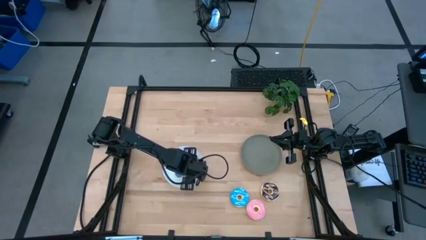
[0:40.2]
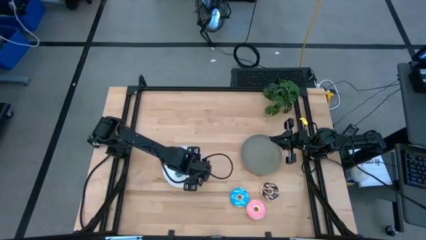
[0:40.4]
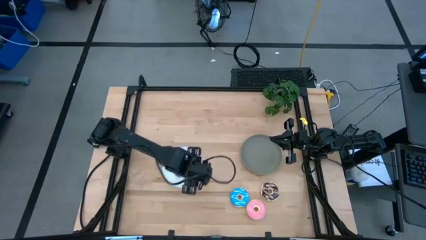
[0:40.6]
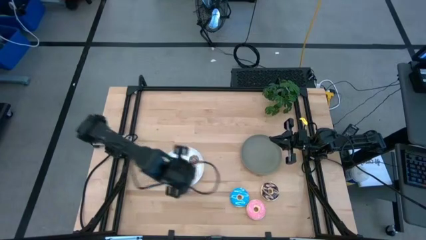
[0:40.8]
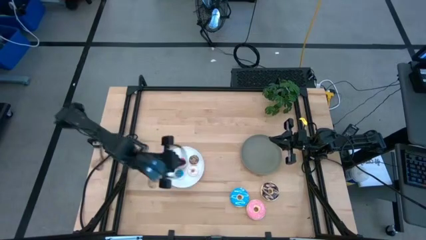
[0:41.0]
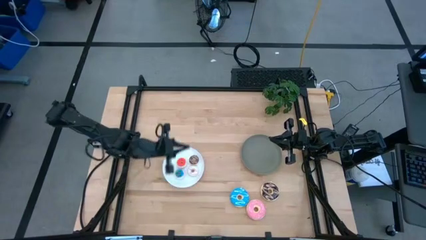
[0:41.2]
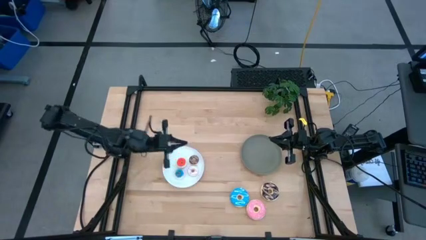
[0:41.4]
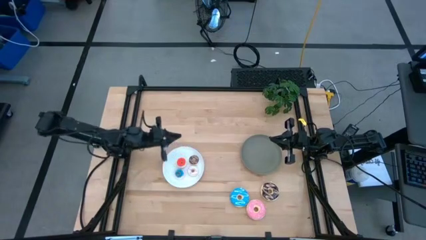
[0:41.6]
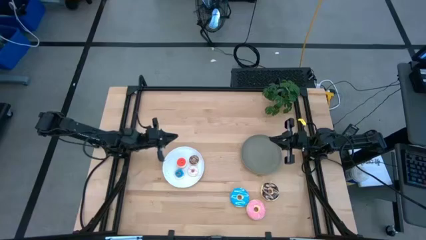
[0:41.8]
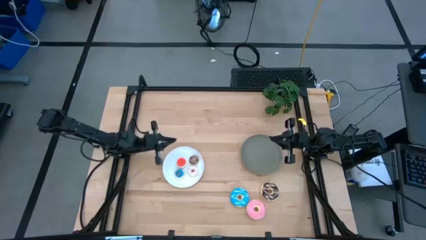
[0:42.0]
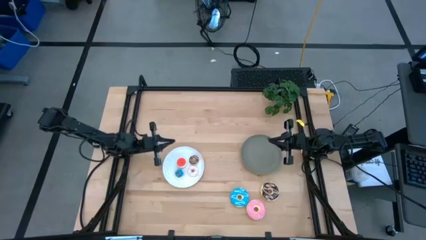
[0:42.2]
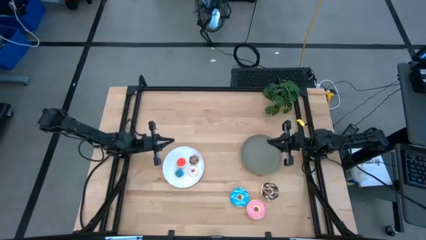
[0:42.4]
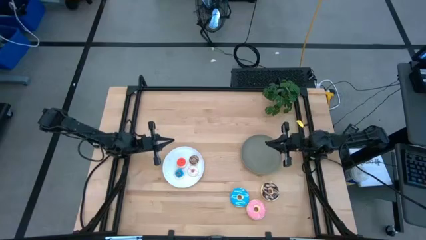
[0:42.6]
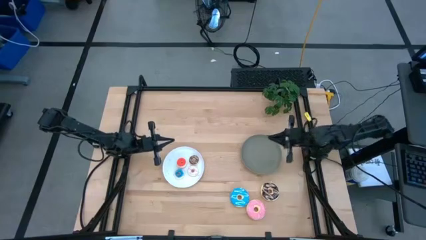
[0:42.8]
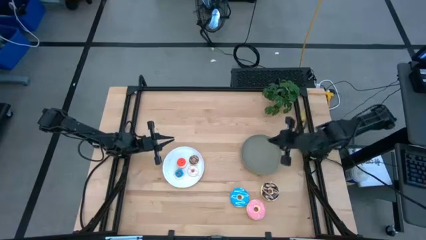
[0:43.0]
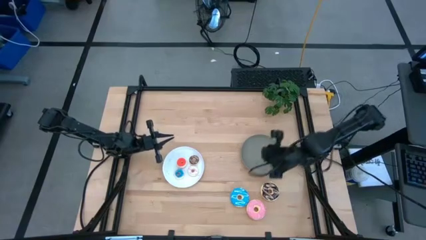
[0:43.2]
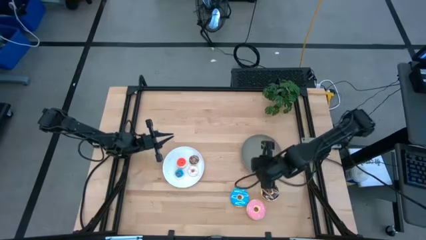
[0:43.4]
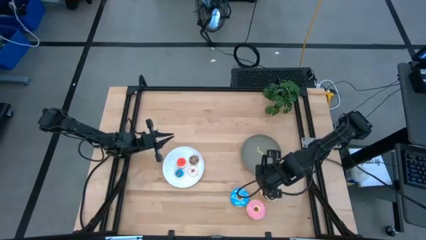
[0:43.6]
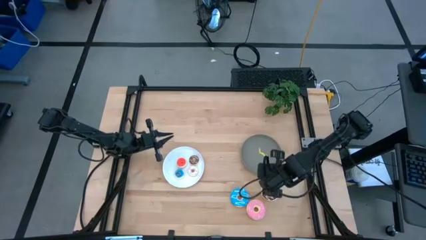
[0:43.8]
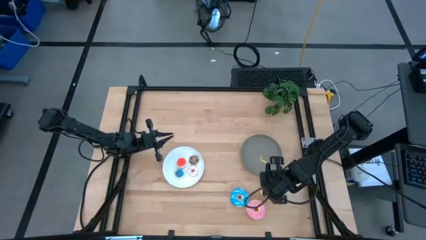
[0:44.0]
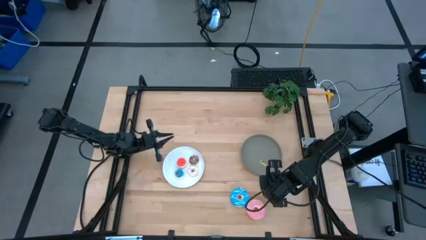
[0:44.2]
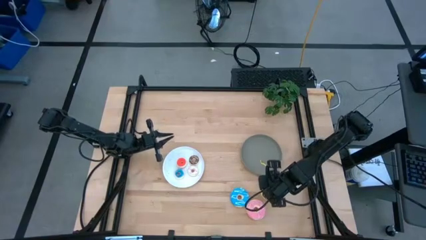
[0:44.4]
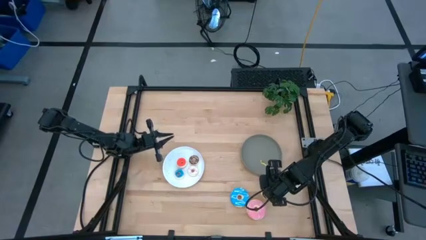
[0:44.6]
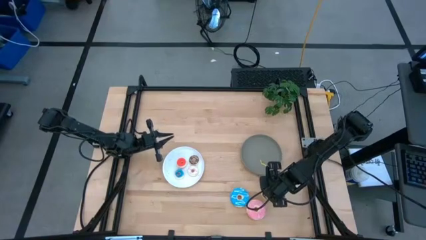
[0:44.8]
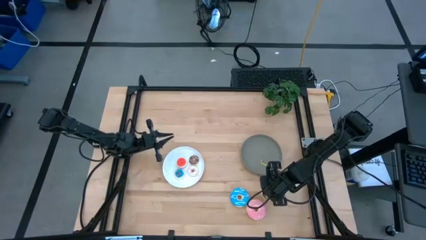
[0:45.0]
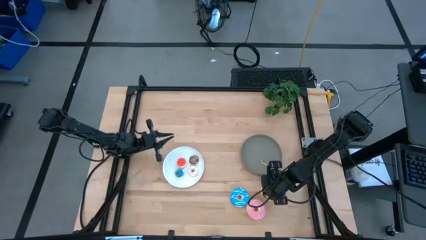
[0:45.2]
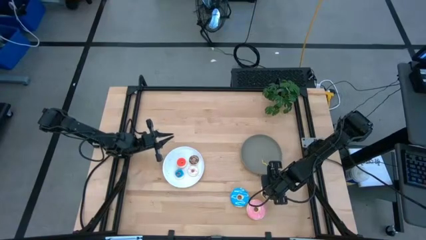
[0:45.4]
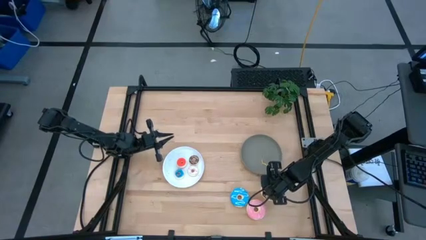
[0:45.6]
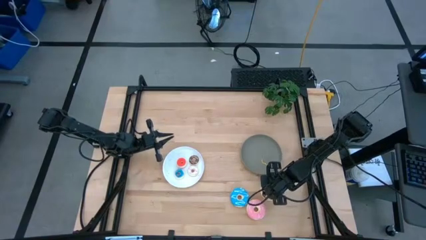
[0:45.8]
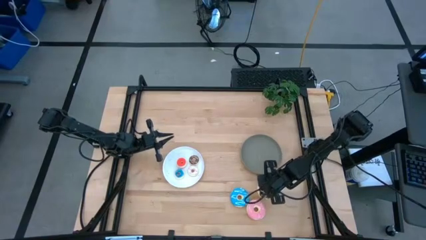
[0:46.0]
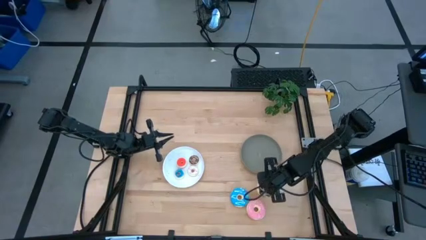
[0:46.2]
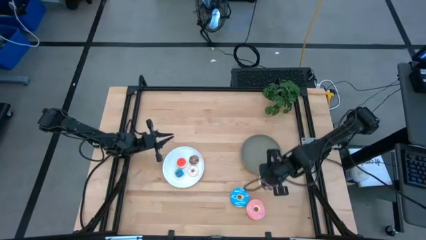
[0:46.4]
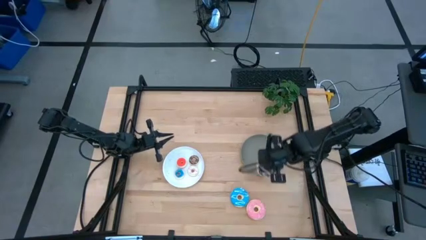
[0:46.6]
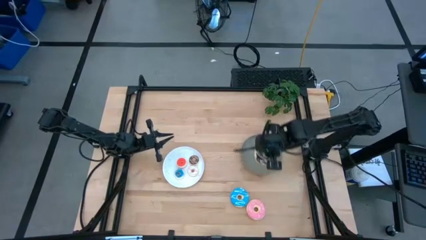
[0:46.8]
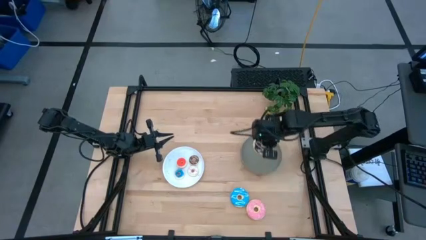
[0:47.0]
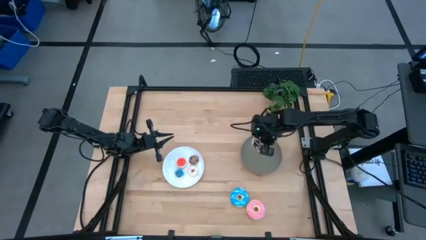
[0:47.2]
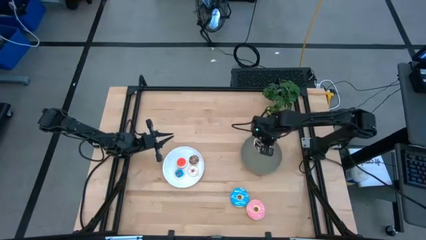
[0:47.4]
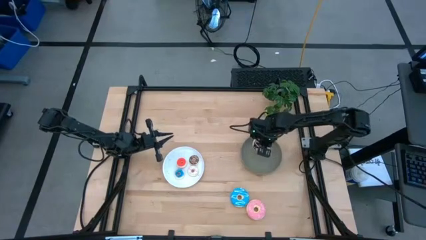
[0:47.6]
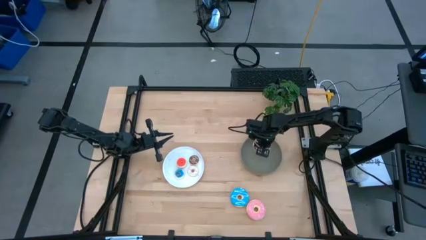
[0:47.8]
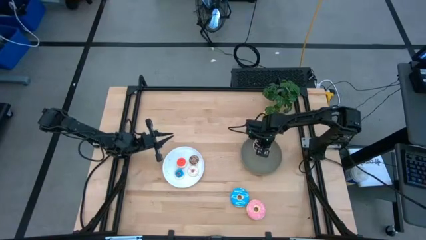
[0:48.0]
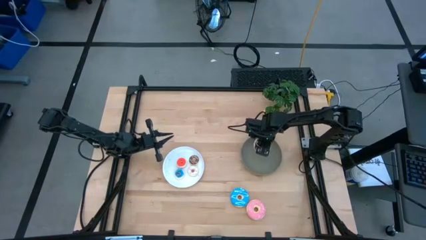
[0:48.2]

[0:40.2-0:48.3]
Task: Pick & Place donuts
Put the big brown donut on the gray plate

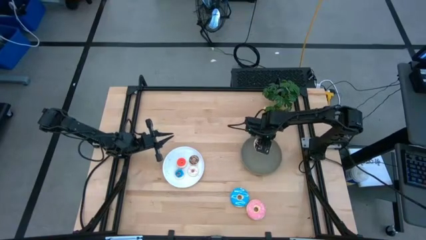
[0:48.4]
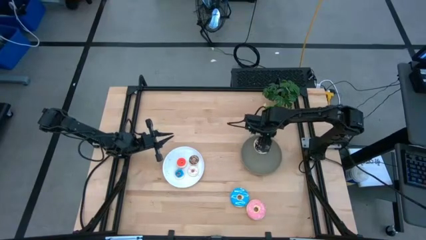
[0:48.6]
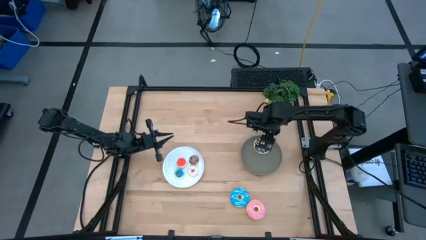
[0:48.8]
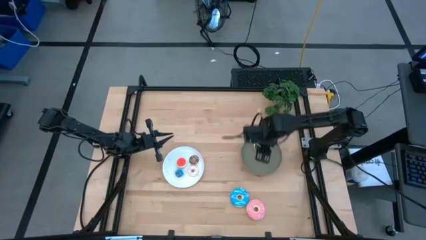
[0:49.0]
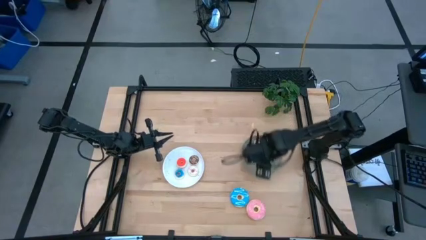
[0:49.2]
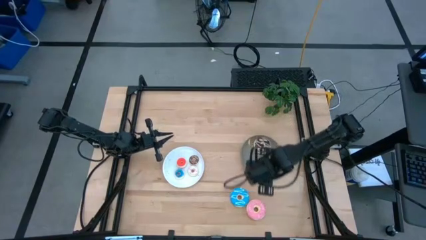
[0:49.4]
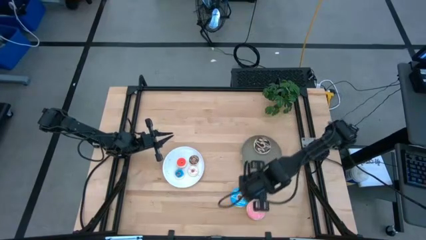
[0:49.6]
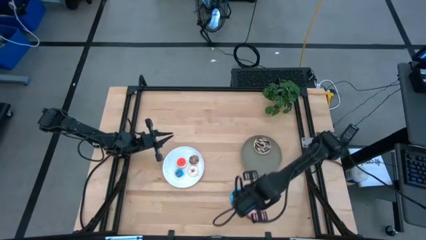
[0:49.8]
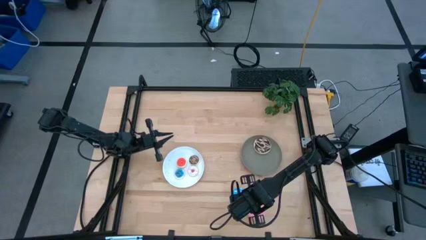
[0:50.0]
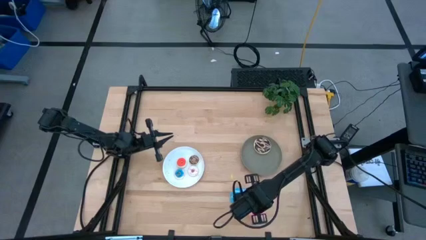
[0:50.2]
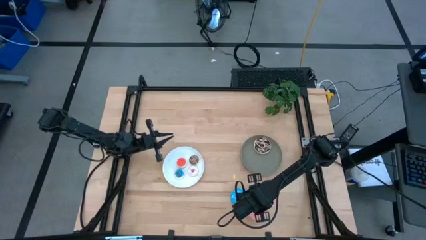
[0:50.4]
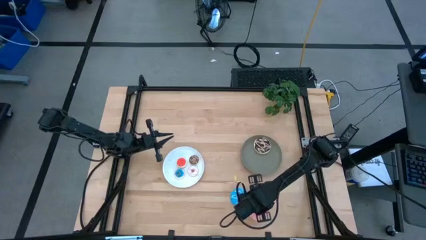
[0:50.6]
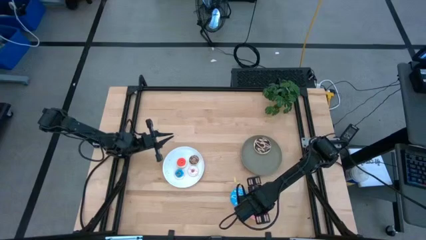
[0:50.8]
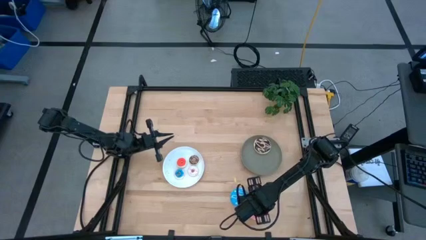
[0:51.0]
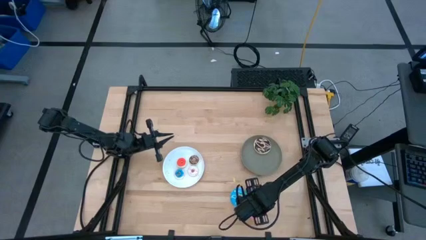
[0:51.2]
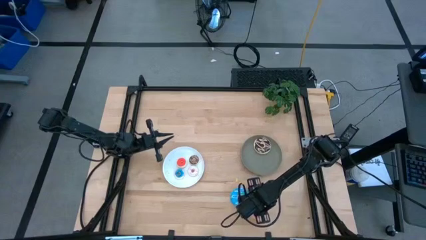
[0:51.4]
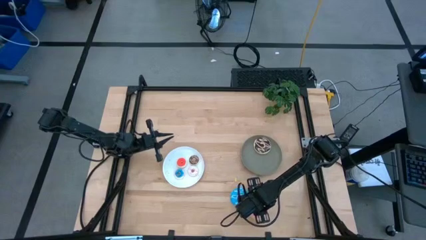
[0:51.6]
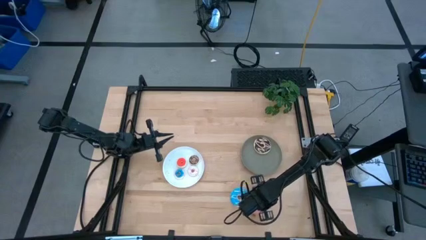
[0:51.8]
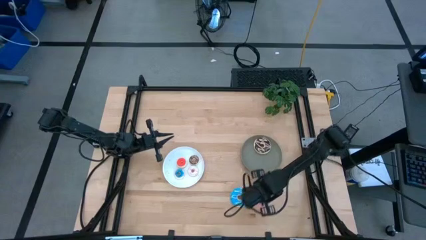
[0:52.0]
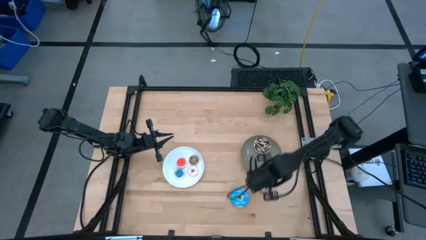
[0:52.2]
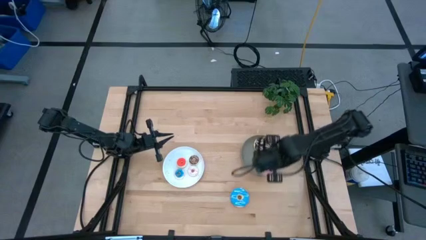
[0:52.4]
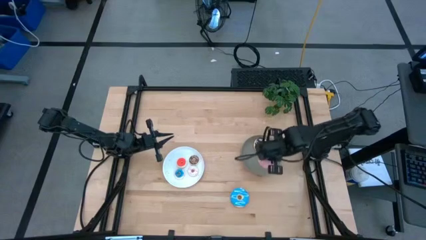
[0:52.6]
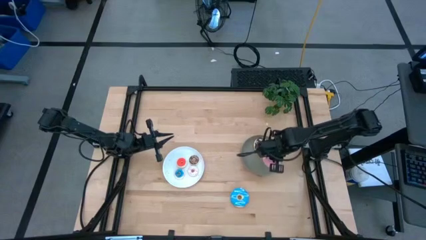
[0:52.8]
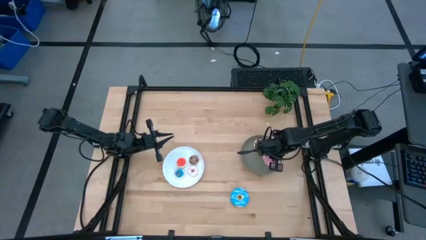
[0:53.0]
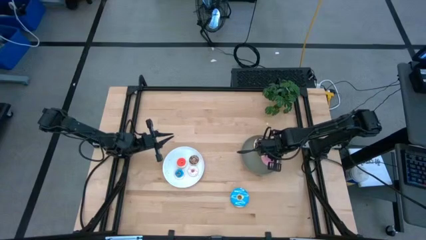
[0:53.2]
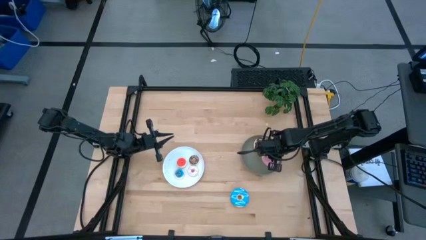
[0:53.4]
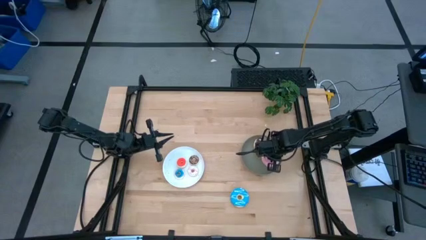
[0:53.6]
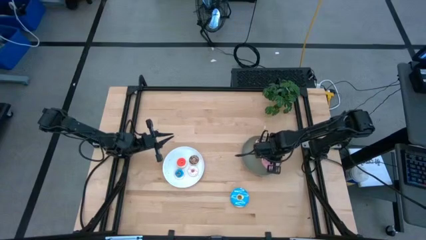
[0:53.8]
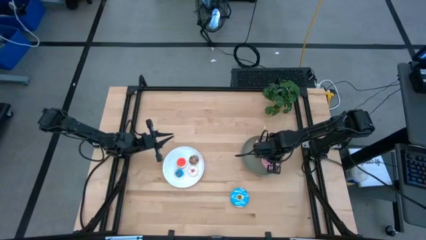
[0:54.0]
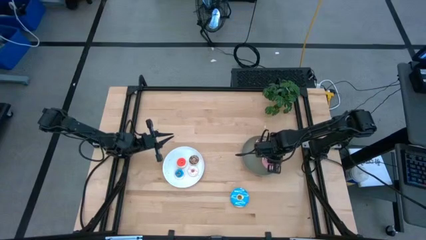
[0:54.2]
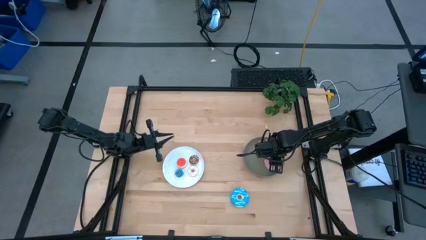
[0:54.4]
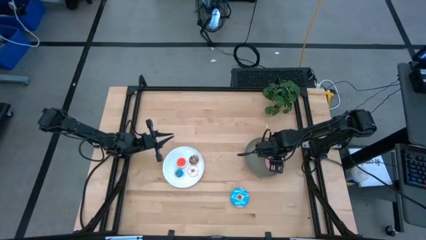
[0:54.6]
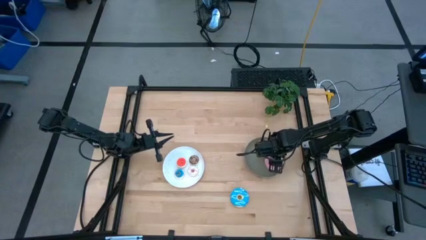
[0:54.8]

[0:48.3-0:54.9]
Put the big pink donut on the gray plate
